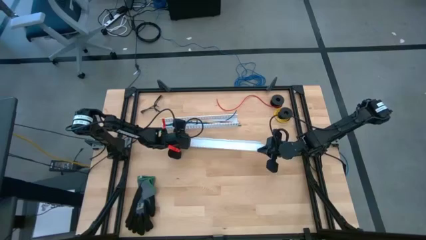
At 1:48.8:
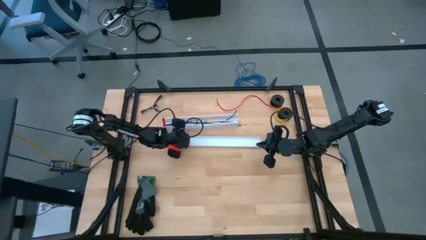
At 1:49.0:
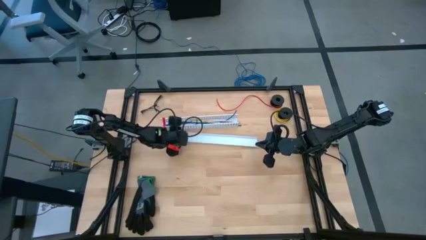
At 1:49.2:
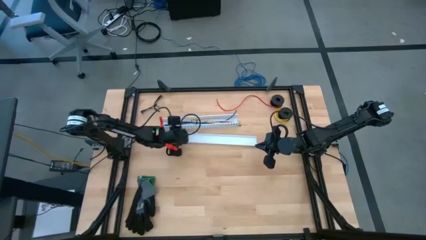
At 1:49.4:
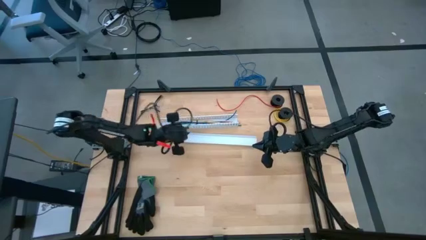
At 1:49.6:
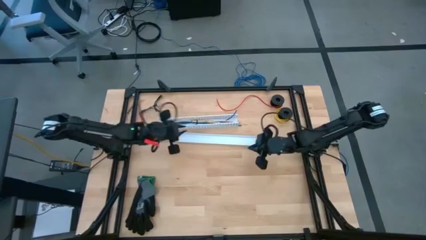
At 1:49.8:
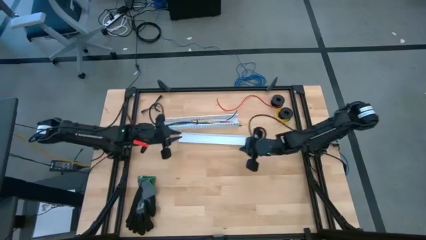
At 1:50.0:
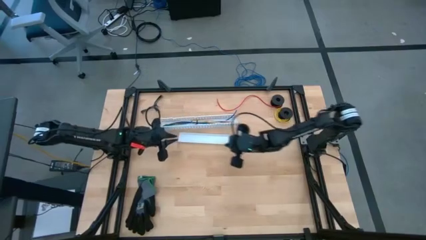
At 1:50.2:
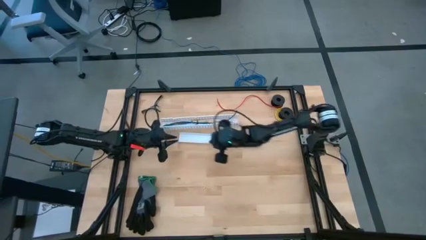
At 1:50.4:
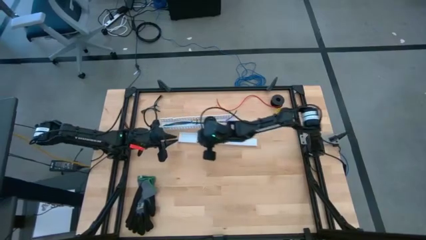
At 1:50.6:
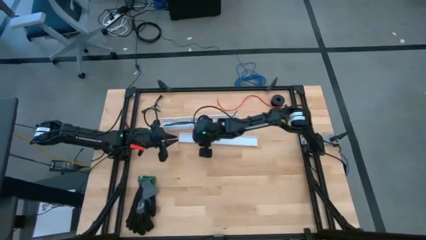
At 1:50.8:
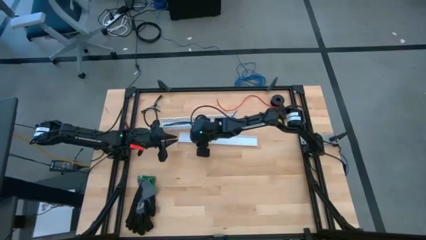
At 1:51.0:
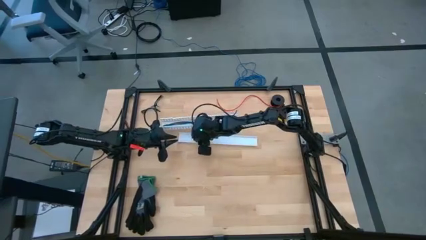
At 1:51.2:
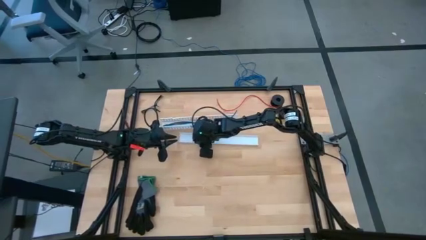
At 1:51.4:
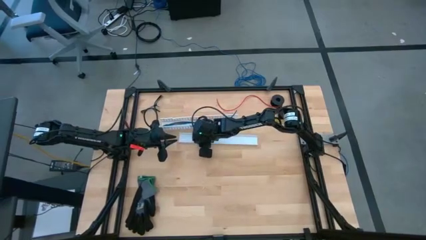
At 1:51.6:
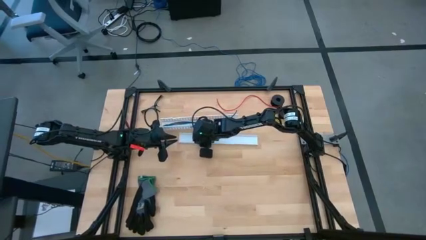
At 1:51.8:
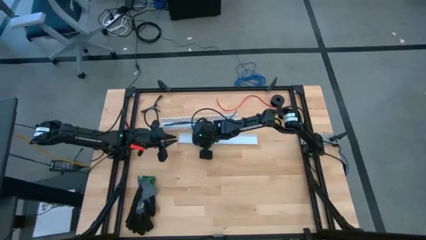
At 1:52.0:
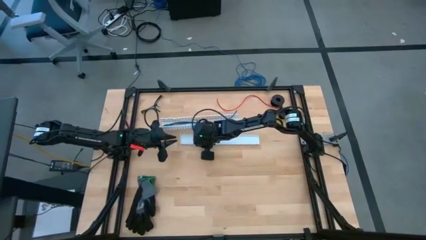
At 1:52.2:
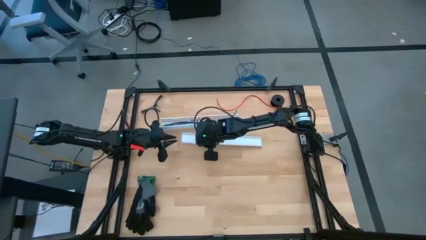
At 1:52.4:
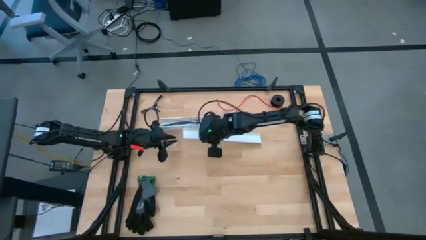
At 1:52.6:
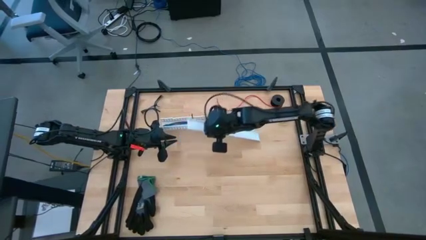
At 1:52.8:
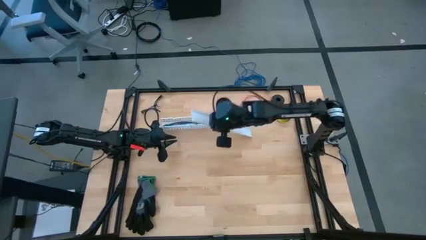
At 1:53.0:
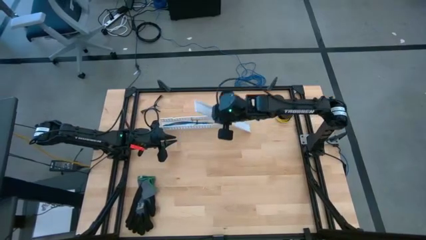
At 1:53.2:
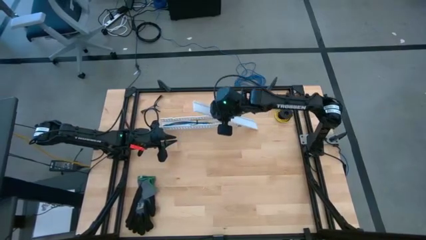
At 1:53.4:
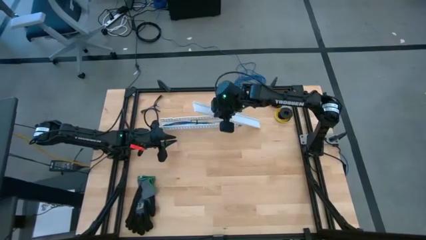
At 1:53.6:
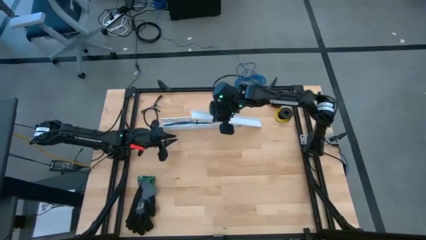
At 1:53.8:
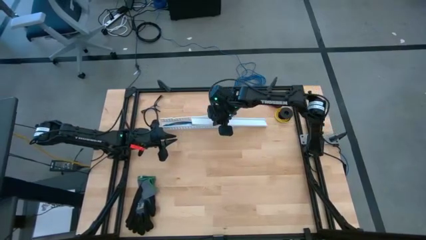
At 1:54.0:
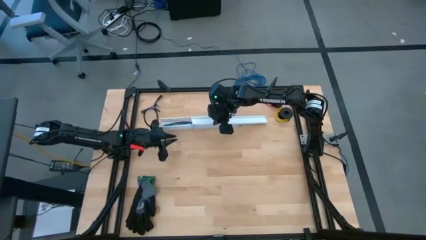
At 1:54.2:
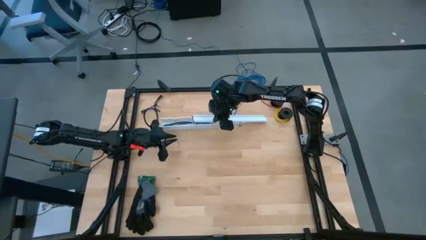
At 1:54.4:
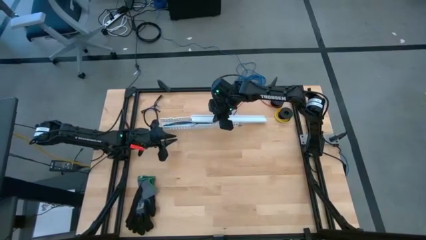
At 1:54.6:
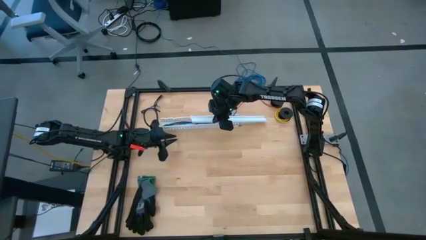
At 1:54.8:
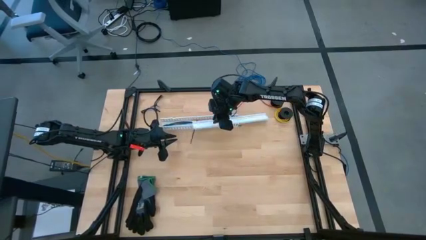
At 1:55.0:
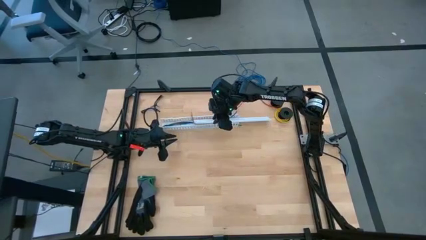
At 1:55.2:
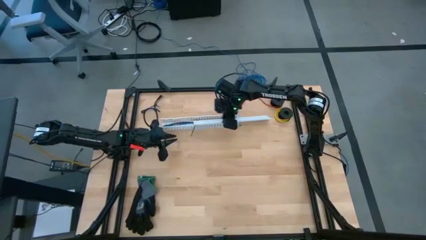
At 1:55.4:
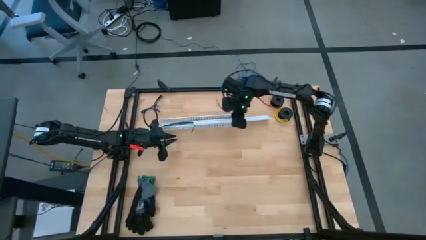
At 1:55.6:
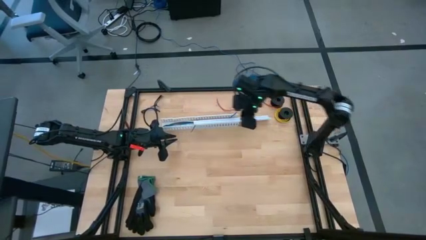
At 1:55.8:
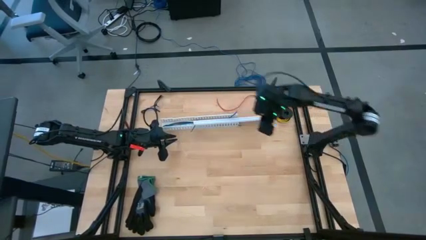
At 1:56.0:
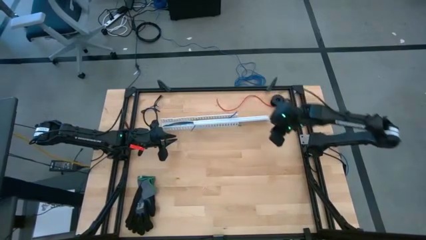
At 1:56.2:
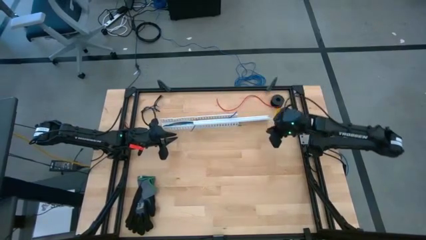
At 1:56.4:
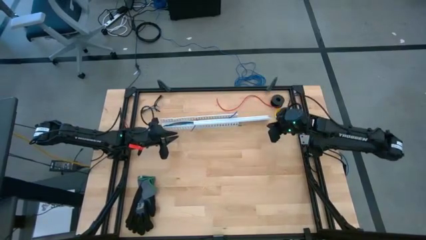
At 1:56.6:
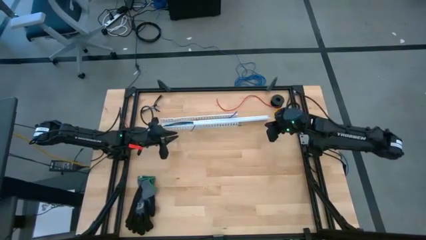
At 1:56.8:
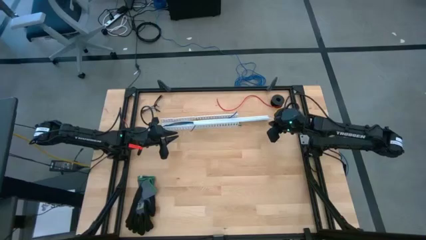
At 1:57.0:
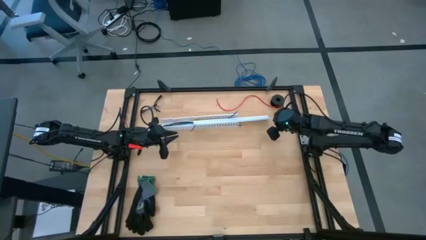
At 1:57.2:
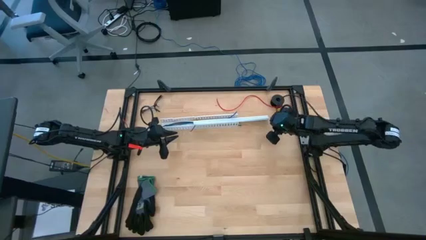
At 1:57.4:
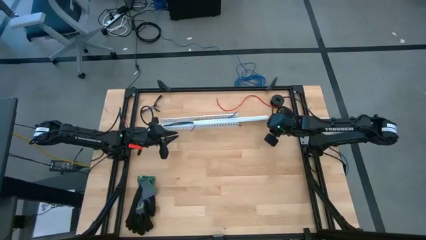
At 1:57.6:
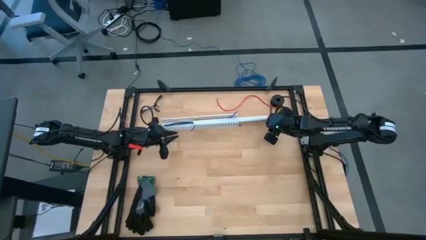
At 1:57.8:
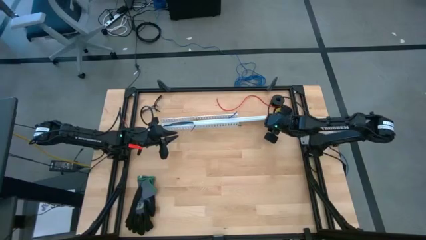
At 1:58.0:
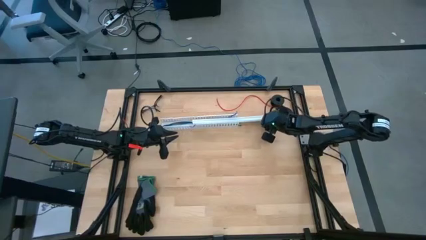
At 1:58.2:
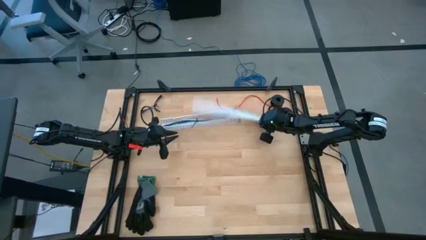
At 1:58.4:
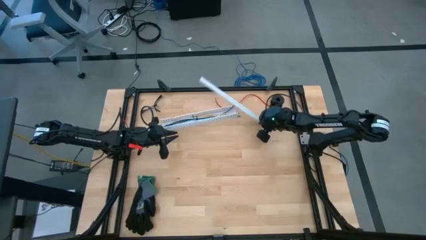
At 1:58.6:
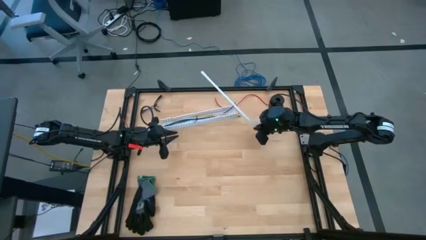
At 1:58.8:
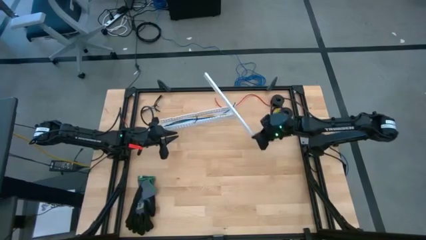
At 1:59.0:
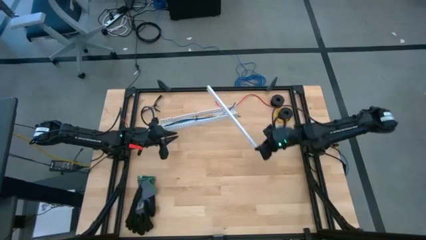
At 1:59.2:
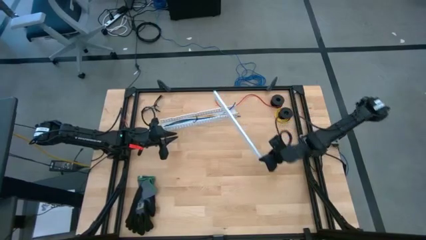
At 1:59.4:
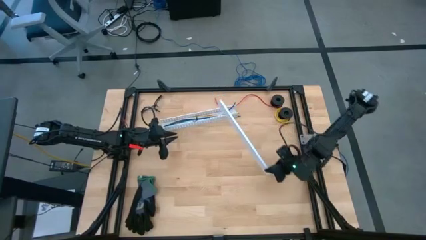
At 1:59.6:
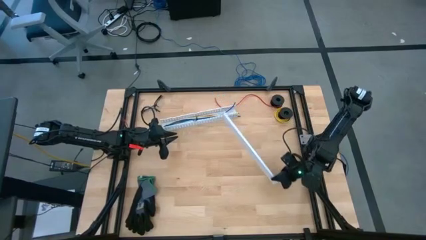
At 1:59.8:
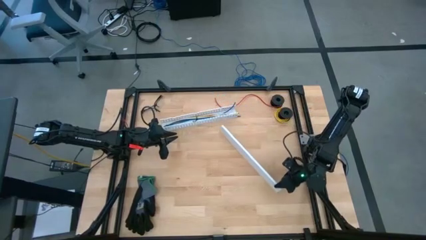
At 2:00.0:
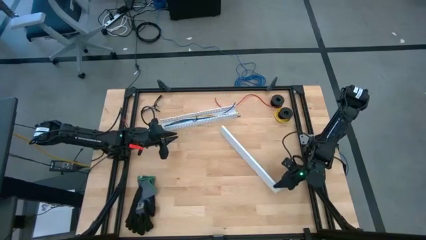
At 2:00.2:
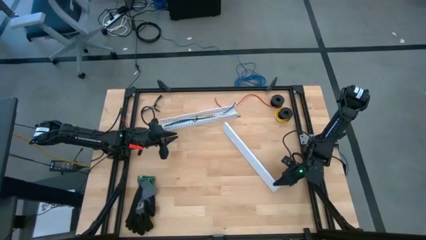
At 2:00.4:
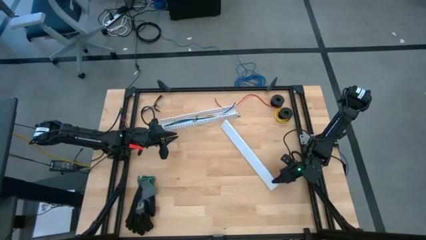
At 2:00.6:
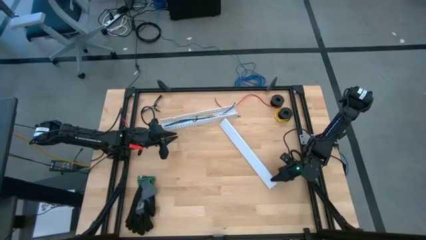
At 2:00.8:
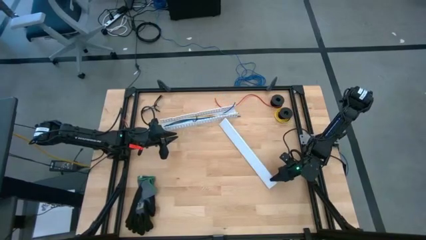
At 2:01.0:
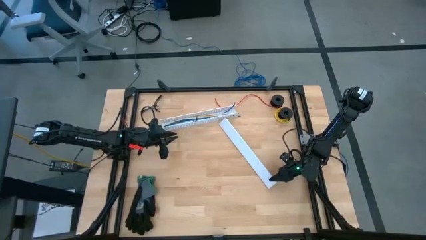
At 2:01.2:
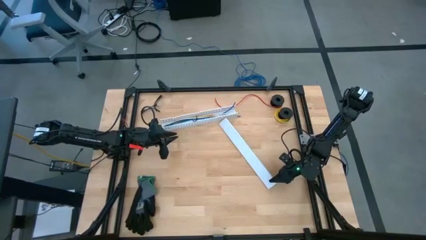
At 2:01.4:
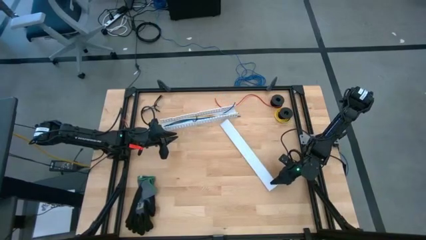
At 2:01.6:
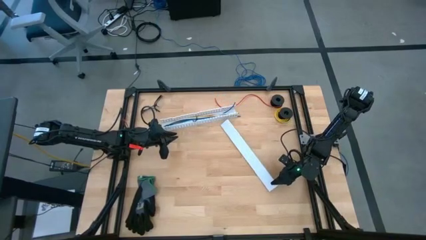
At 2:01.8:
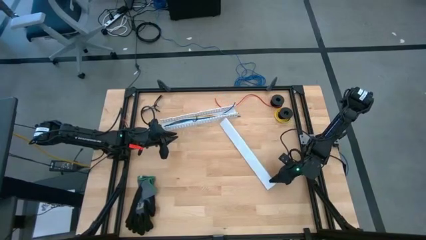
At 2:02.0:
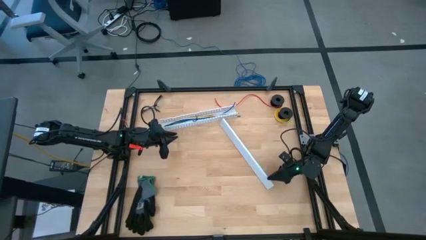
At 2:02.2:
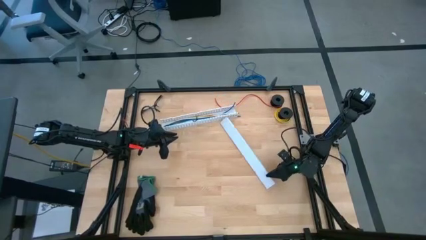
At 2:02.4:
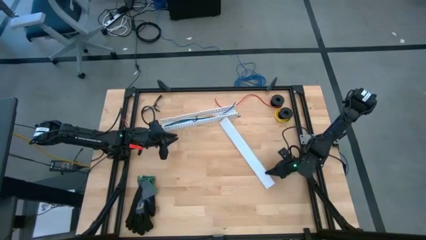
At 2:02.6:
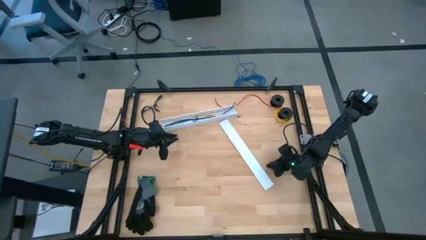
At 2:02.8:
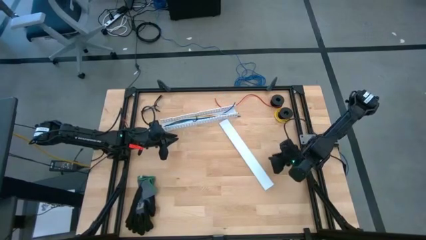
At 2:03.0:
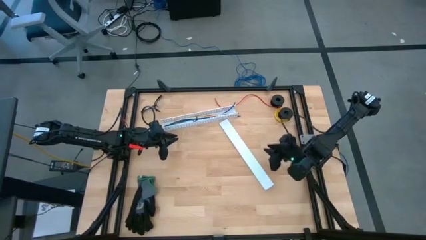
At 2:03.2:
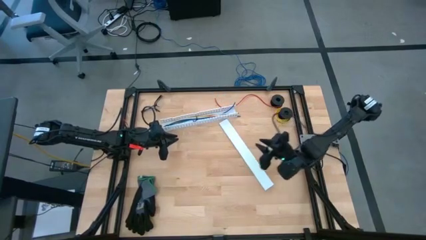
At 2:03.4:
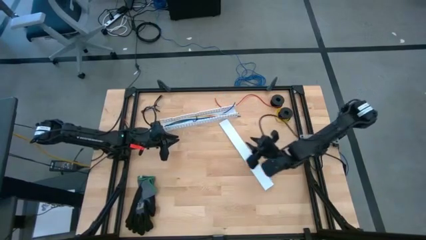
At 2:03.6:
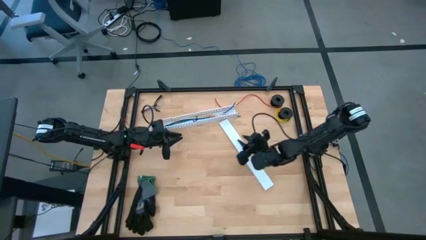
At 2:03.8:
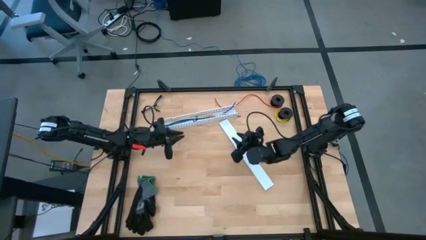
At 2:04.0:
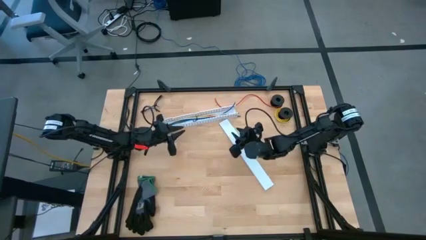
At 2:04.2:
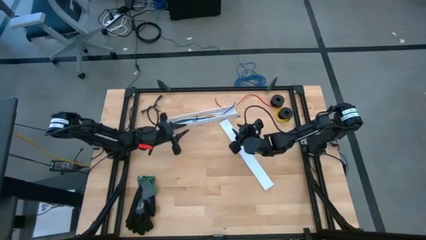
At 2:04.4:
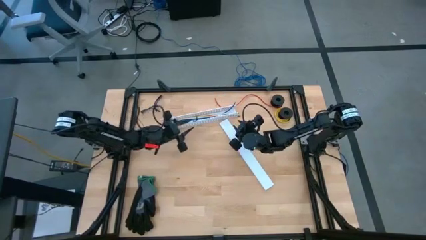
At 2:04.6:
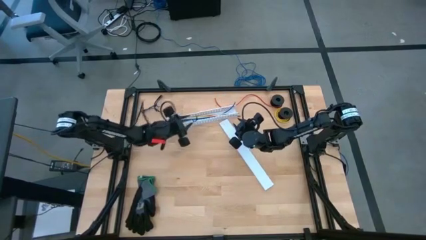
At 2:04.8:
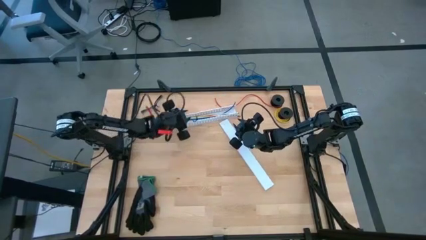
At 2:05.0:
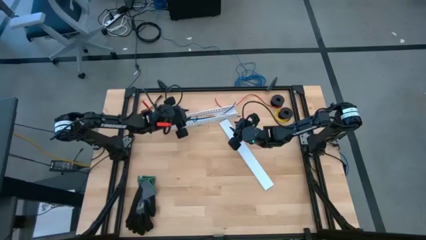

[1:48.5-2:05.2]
Task: Ziptie cables
Close the white cable duct
